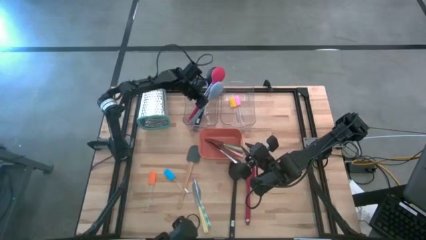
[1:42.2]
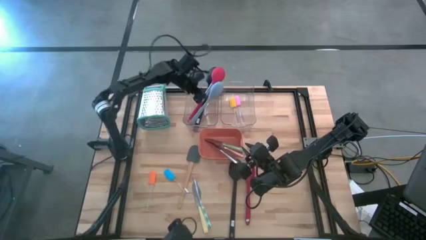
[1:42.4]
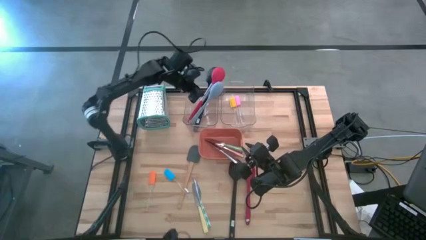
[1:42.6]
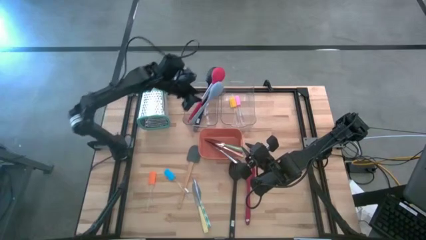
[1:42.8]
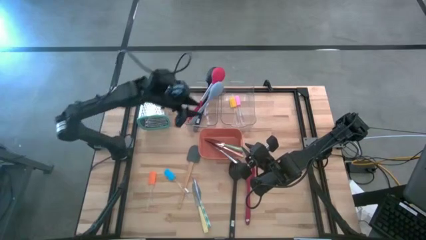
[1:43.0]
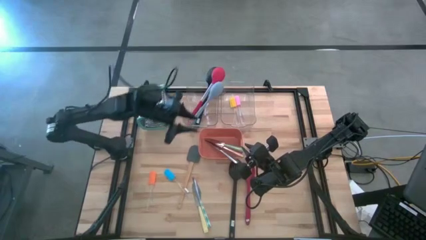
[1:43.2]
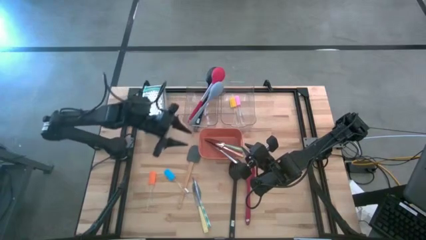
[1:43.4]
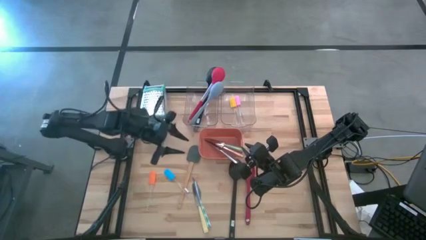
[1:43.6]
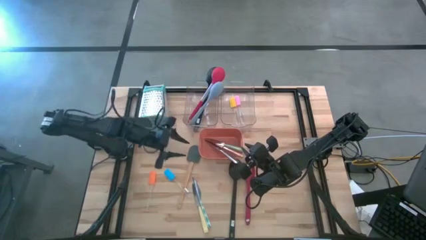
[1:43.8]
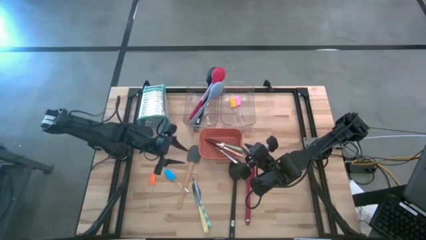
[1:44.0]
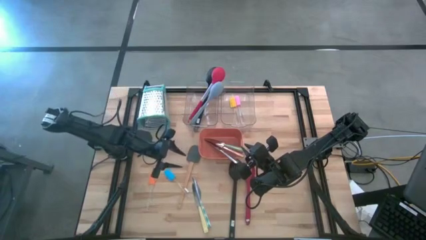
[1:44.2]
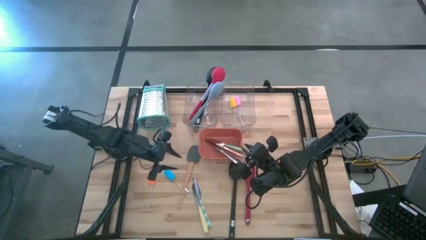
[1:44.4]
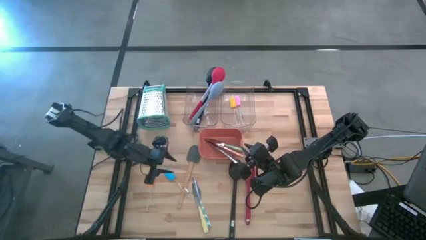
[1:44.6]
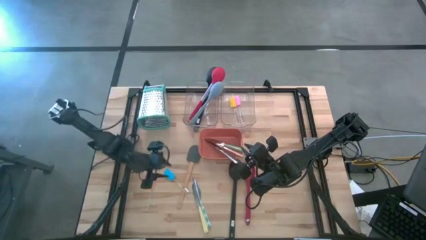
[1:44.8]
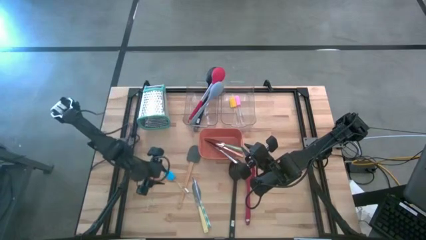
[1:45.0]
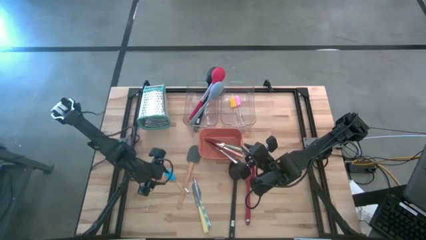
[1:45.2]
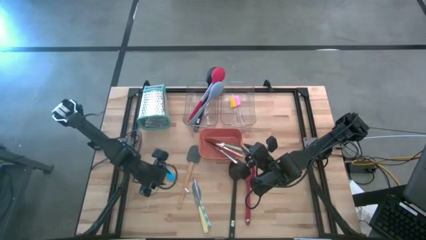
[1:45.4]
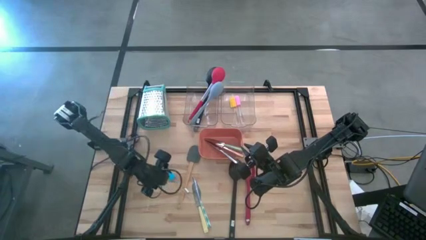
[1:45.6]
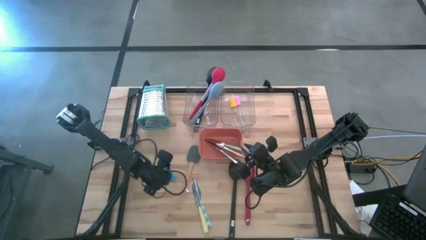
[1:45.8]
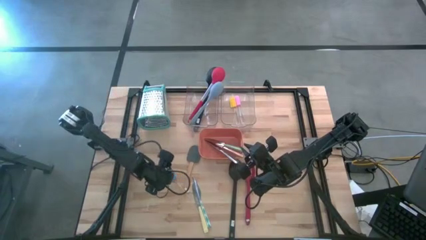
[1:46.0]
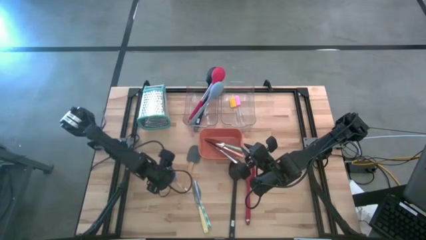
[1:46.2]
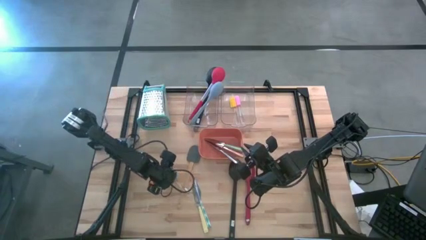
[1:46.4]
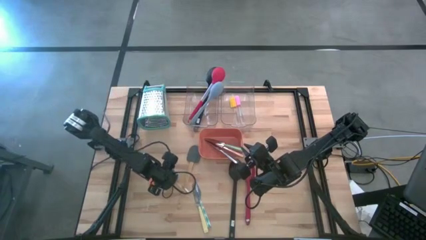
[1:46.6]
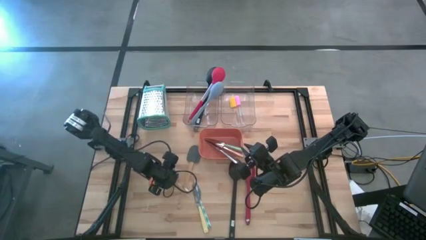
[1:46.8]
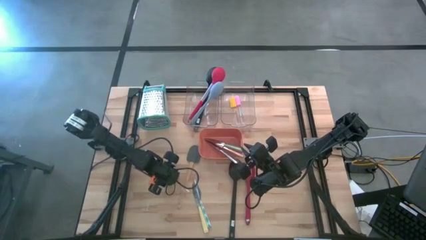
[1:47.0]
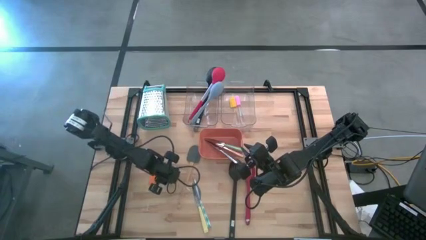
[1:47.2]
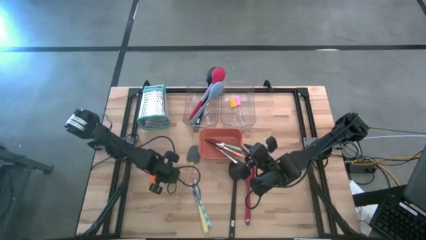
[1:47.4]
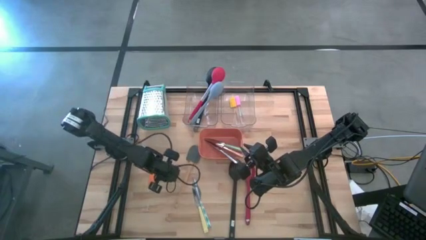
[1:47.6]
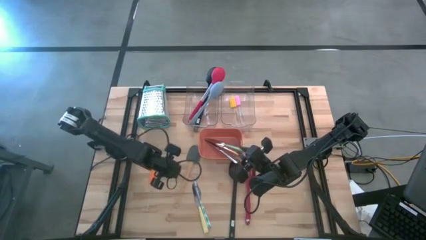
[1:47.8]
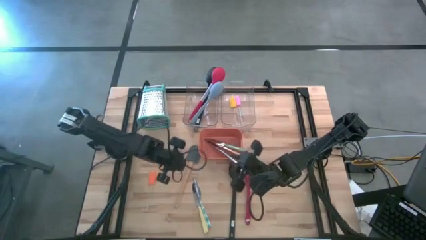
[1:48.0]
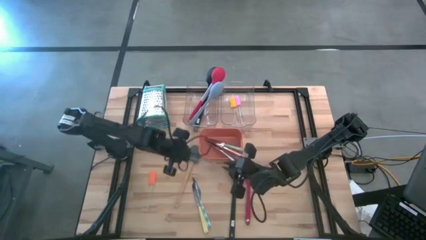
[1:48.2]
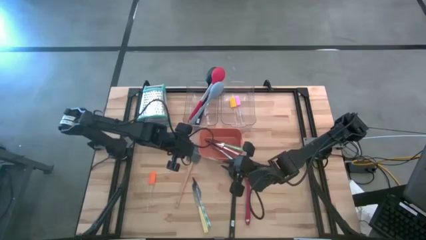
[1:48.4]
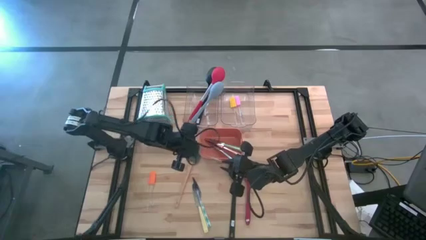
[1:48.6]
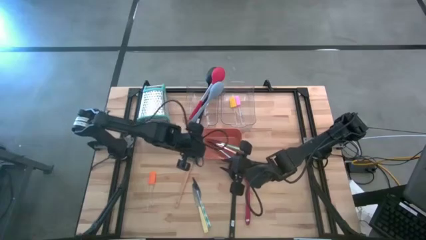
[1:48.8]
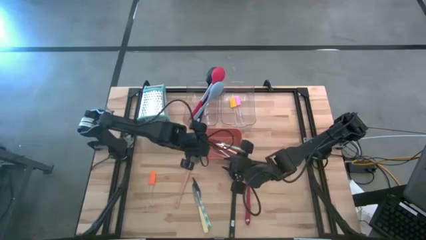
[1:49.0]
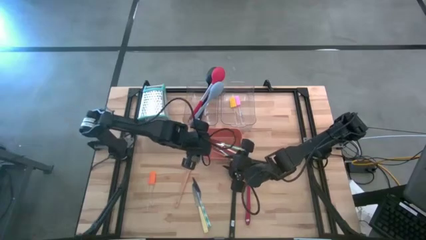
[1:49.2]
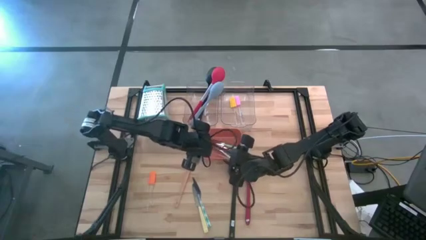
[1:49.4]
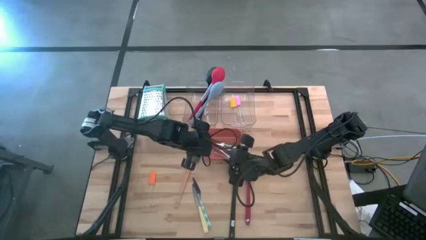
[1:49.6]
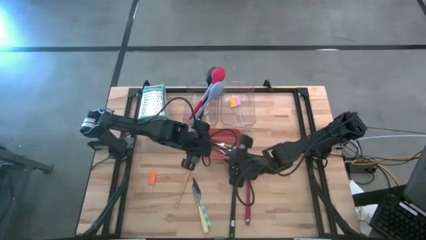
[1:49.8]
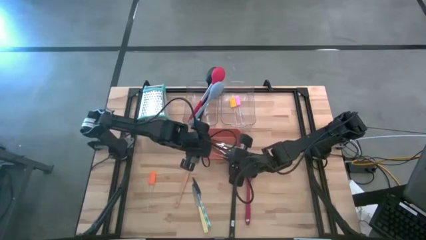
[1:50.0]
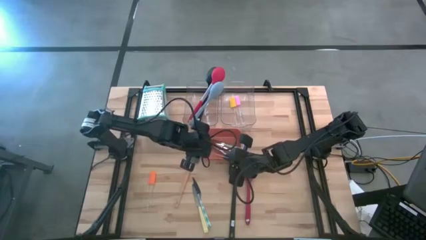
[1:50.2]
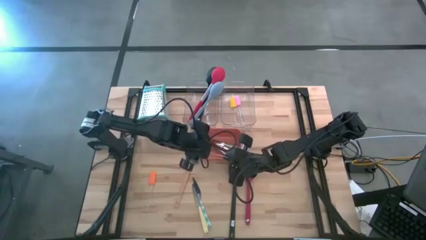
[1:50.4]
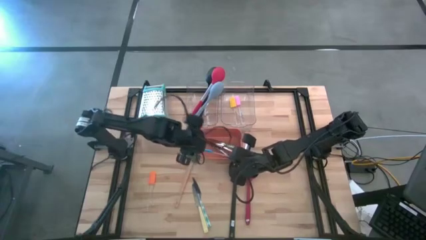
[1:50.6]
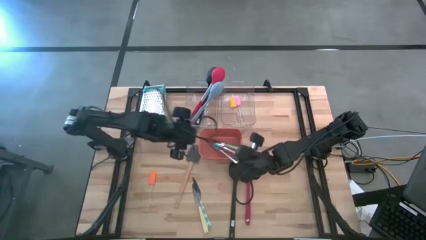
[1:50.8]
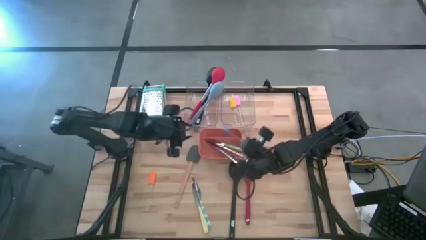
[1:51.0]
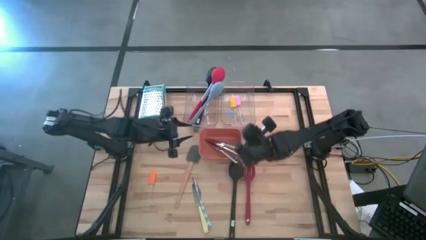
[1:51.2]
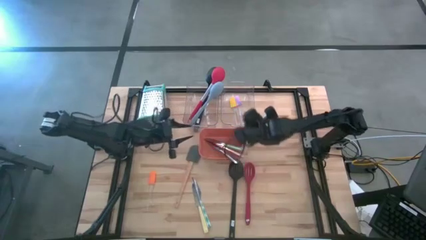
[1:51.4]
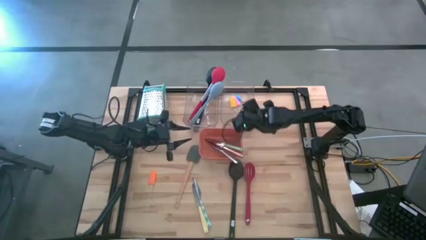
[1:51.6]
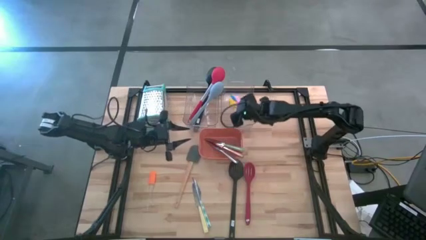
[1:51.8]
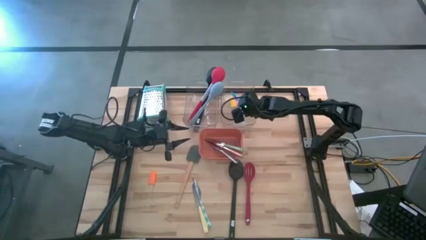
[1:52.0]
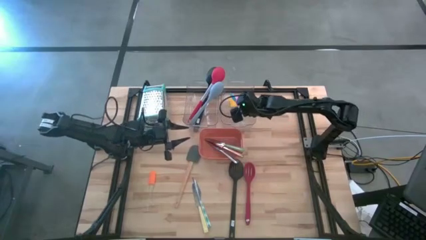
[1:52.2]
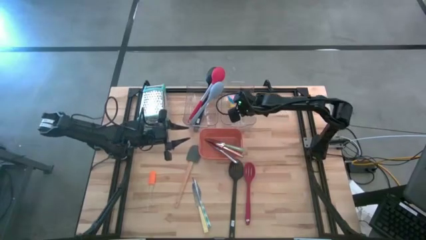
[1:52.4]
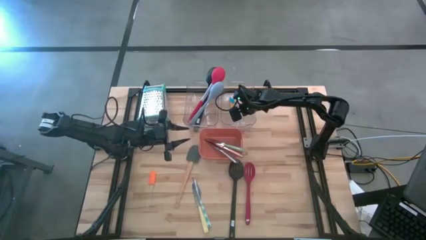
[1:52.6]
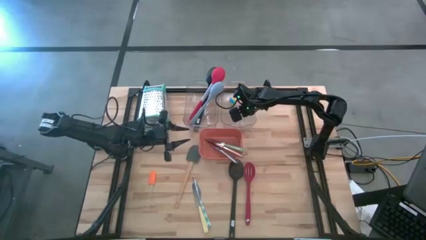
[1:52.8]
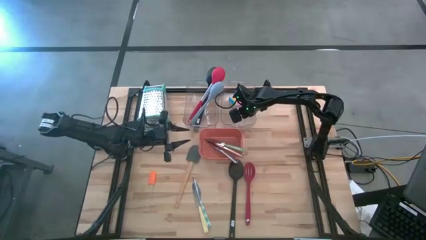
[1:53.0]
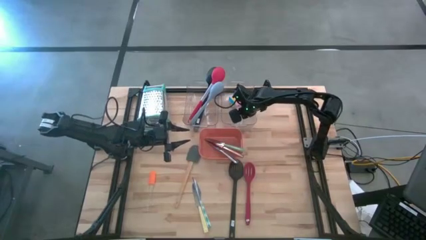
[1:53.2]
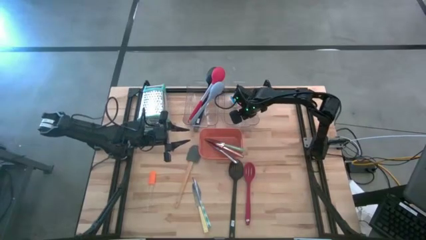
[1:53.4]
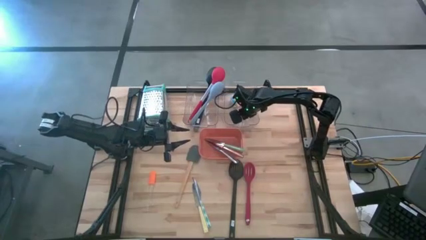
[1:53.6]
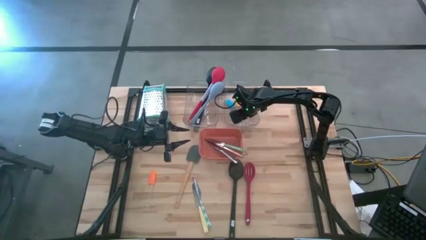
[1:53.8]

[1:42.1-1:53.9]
Task: Pick & Place Kitchen Items
Put the blue spatula into the right transparent bin

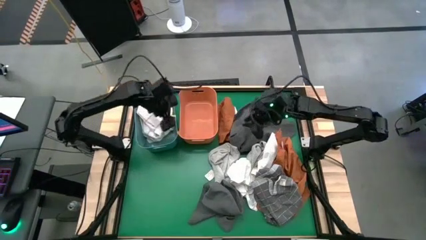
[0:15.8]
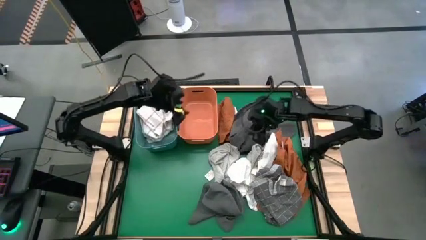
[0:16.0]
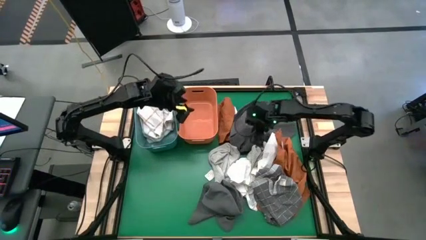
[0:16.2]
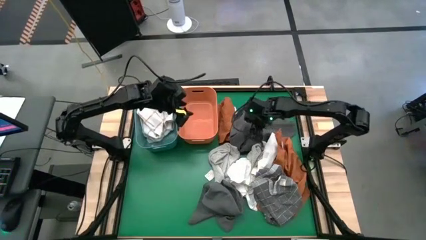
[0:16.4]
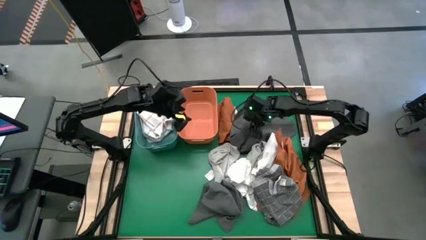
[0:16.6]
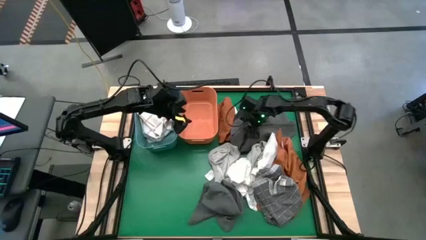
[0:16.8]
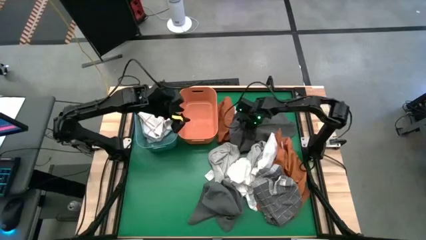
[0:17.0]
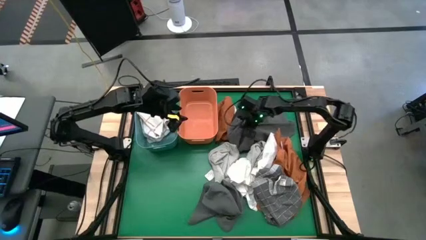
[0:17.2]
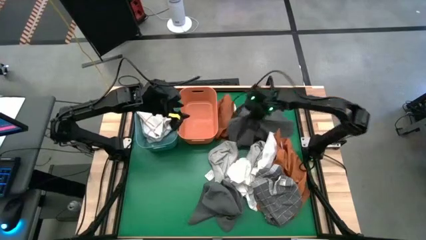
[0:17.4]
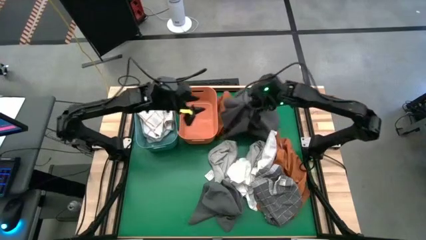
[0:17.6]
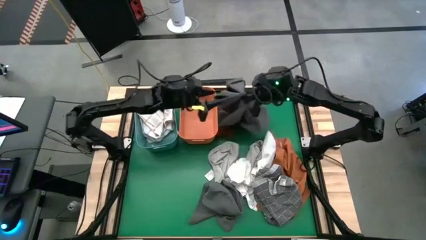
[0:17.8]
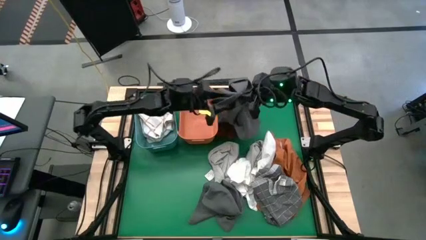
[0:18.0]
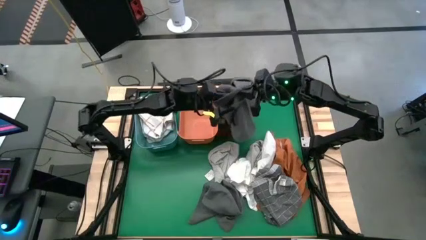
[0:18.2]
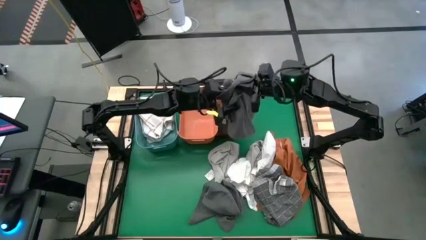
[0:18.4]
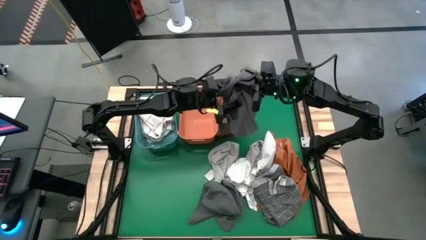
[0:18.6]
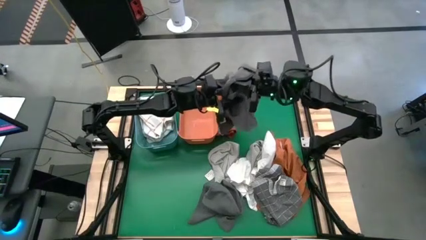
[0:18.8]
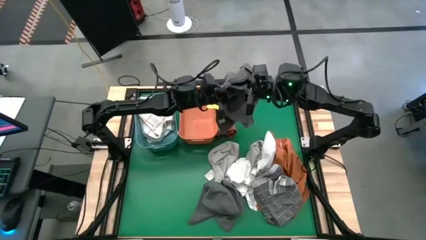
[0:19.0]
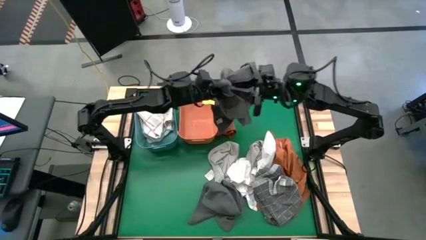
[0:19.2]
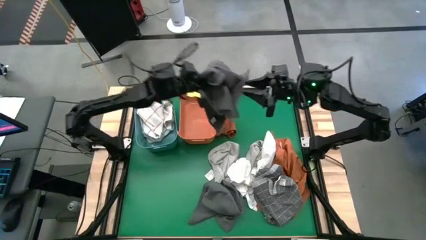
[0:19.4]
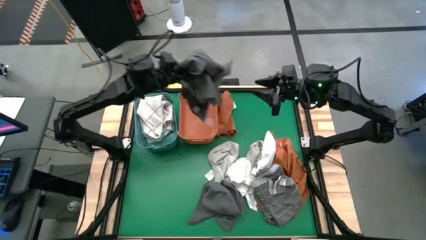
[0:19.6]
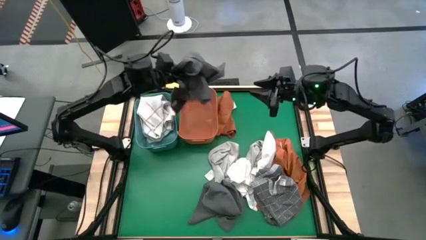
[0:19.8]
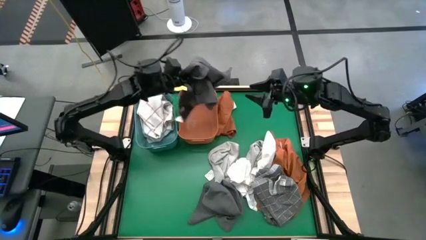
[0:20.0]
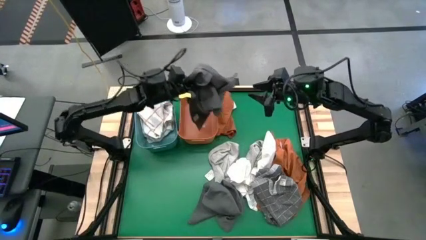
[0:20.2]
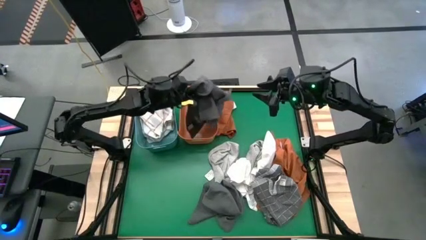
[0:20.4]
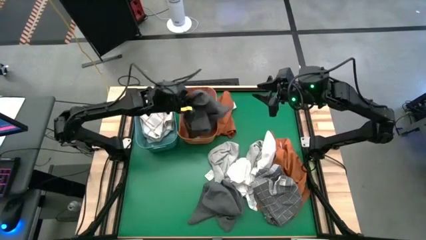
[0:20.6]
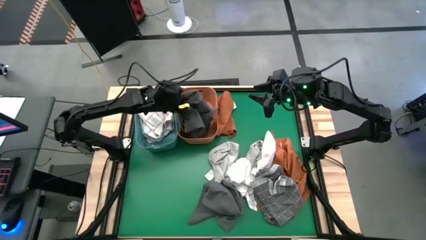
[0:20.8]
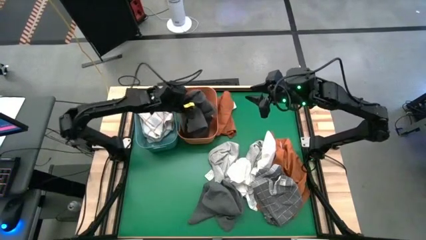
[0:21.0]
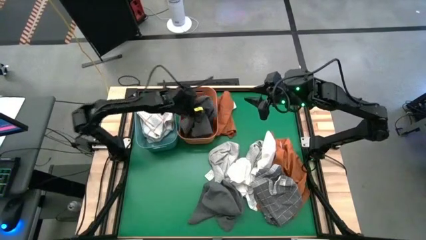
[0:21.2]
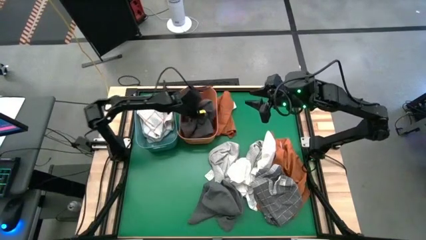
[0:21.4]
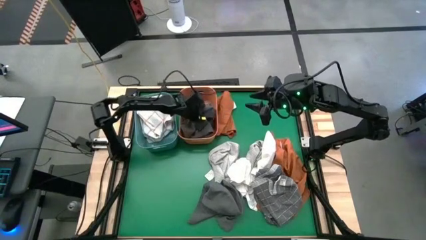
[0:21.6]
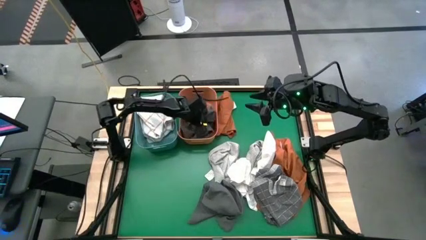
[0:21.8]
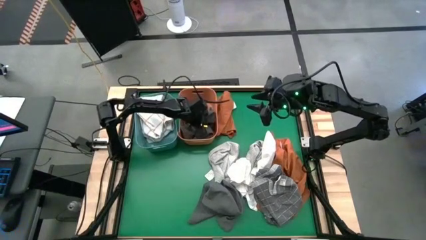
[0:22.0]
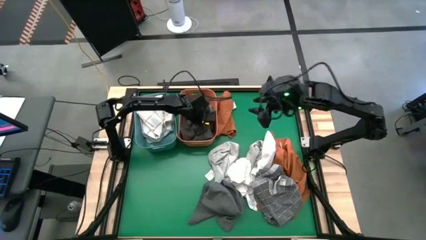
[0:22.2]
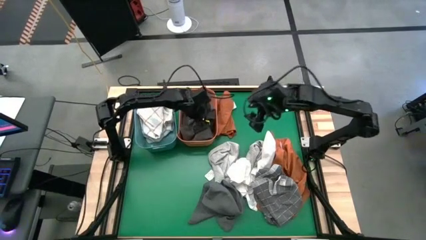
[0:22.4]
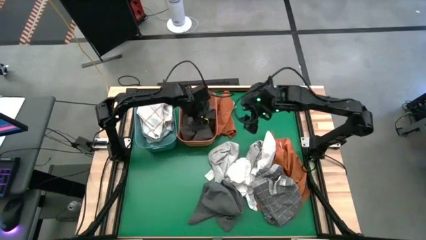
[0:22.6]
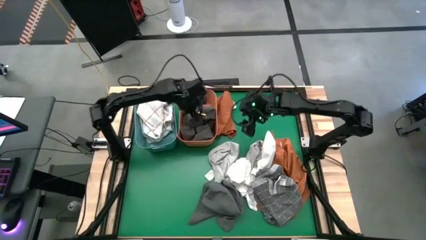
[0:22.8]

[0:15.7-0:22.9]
Task: Sort towels by color in basket
Put the gray towel into the orange bin
